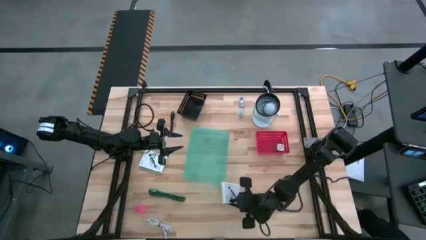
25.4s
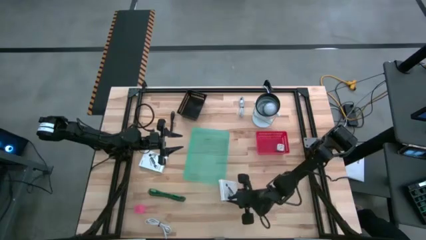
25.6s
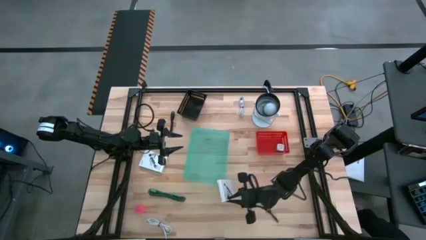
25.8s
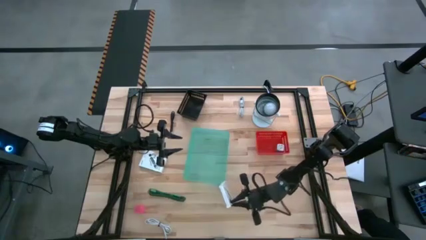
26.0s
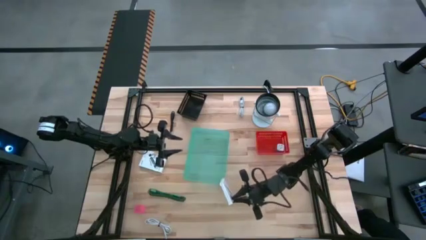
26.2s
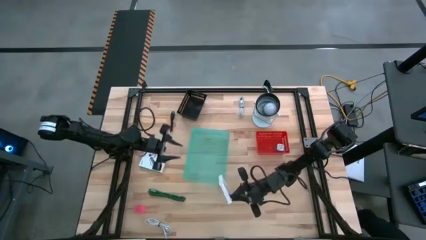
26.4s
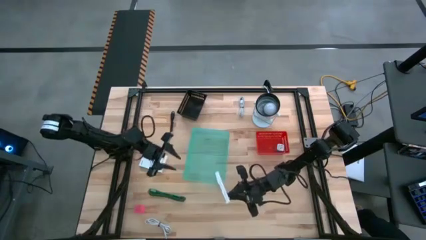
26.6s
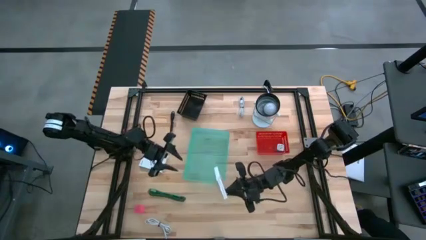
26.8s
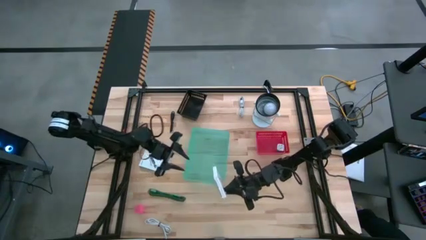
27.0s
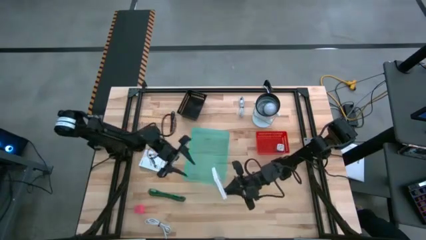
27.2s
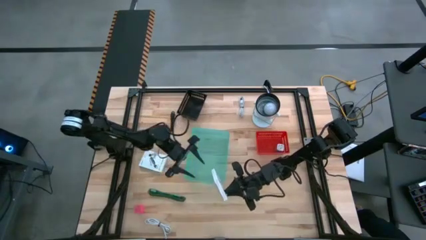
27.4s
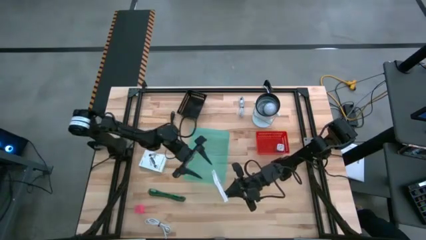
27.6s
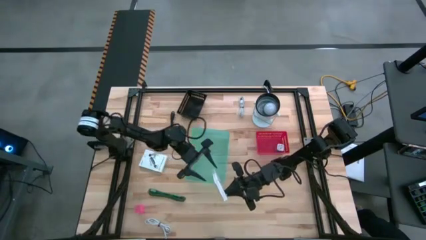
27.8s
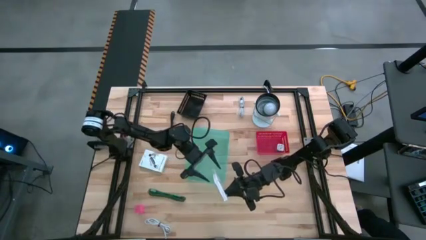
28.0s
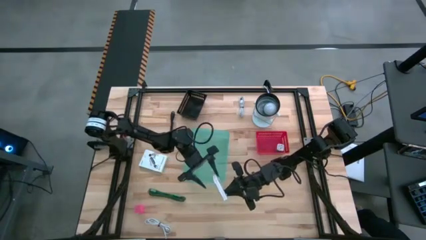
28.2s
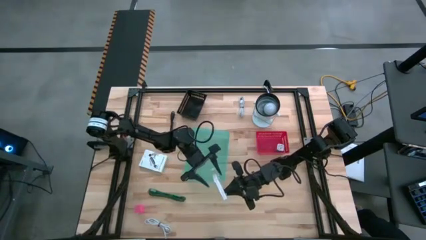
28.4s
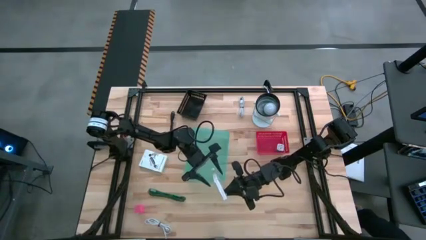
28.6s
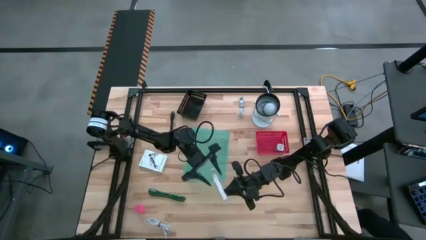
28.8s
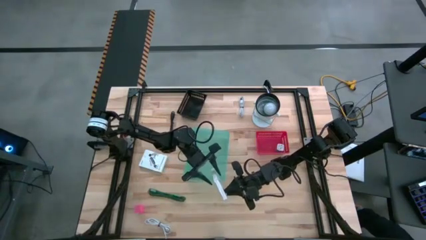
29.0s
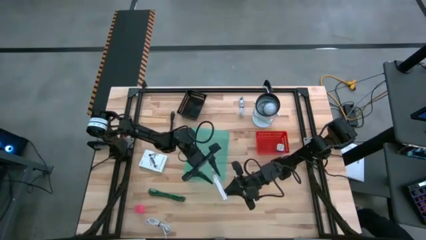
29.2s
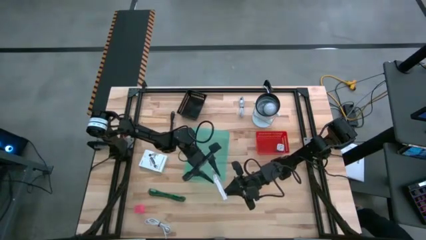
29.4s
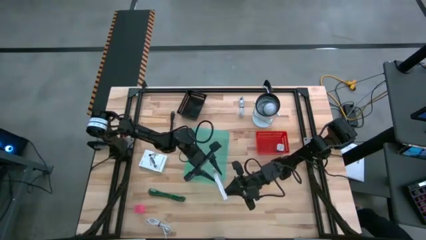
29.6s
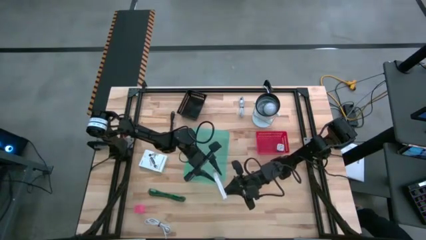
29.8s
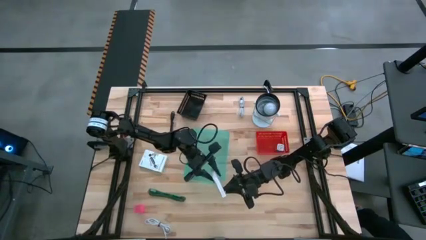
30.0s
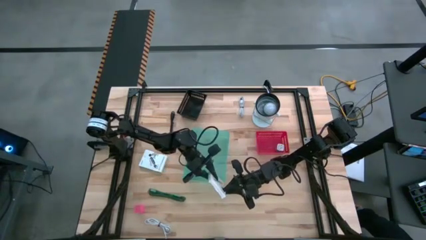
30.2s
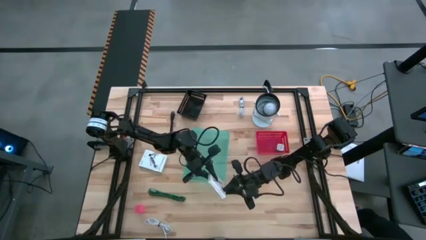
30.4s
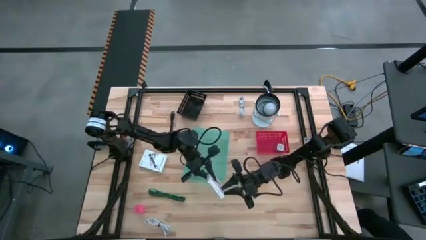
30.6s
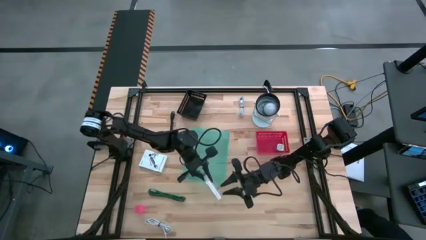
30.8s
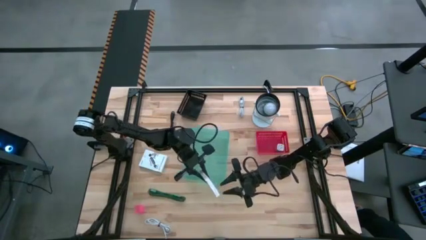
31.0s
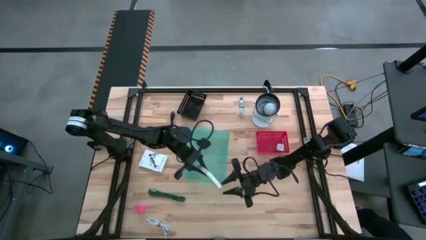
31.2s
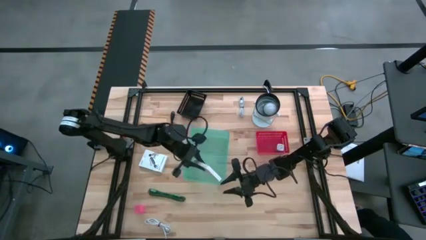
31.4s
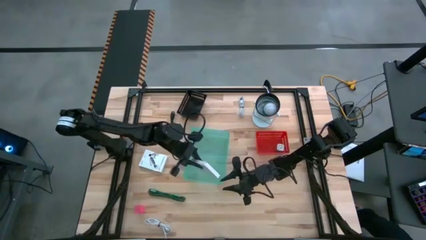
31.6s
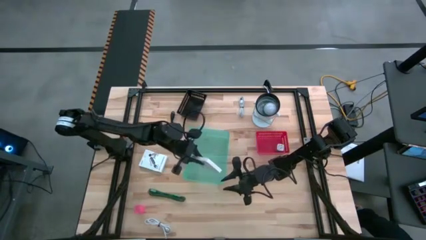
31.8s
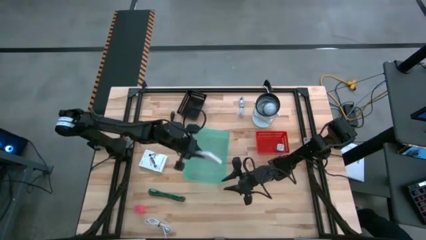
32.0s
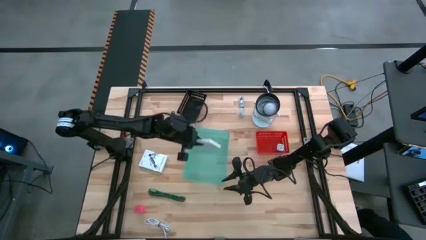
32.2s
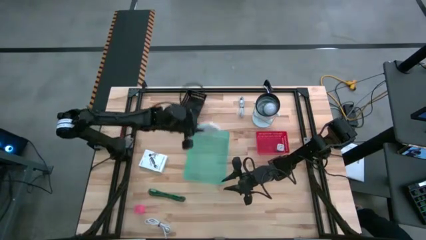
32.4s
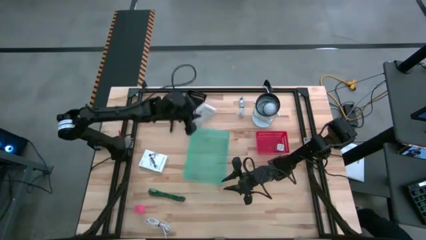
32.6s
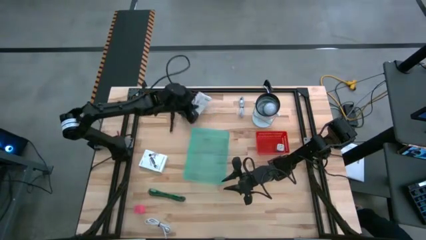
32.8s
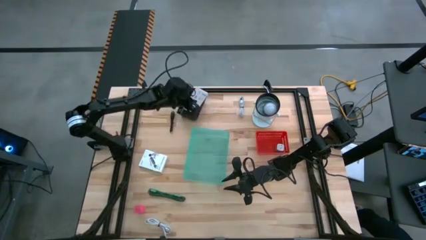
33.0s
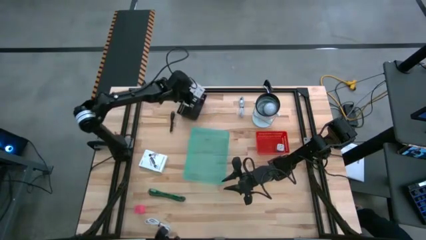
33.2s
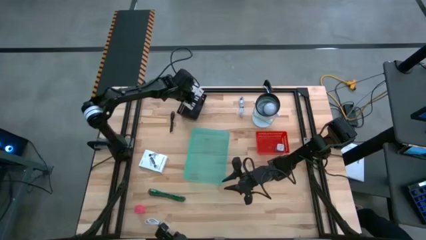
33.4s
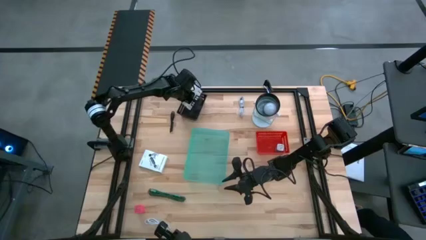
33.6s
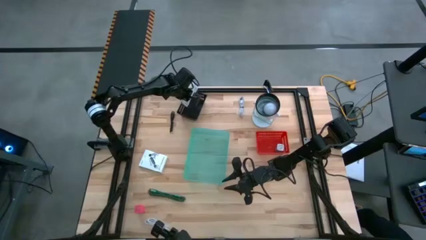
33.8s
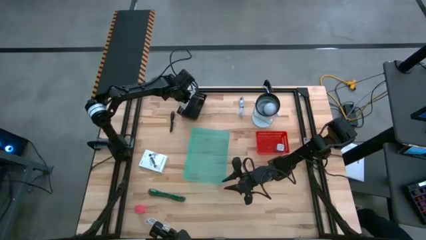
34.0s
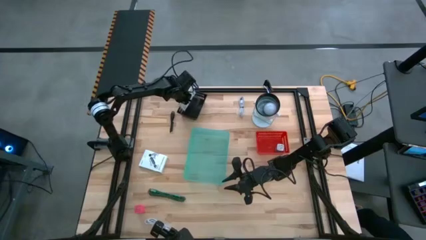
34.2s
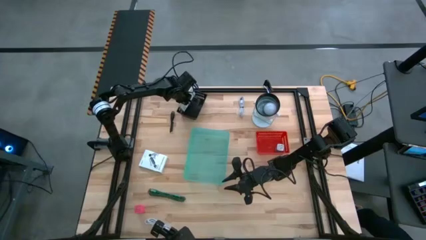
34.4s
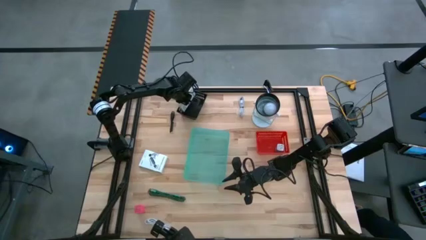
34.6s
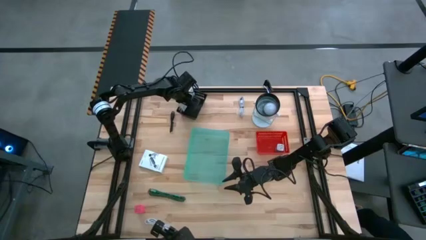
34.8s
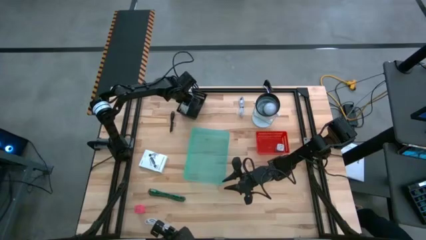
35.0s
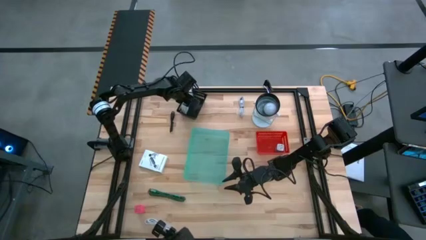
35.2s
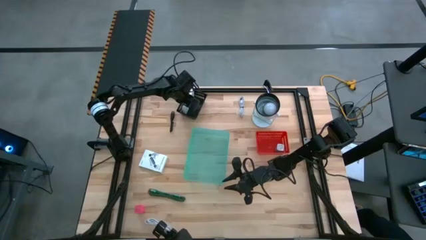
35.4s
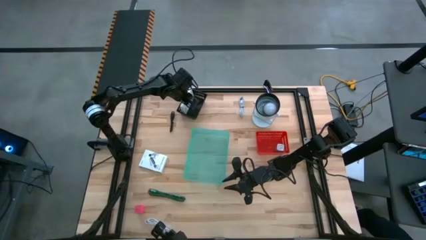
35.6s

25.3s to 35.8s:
Task: Pick and place items into bin
Put the bottom right card reader box into the black basket
